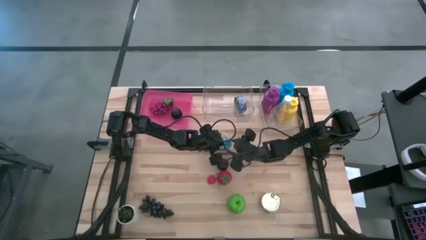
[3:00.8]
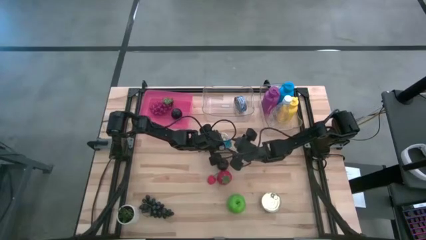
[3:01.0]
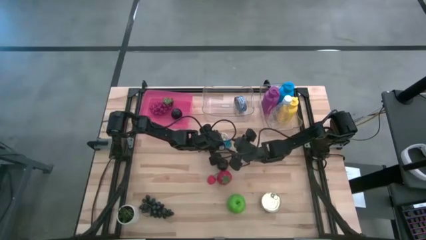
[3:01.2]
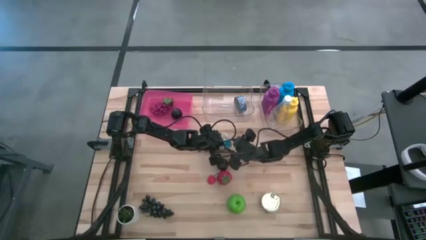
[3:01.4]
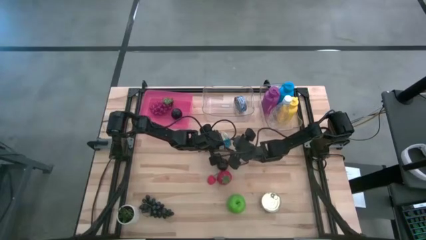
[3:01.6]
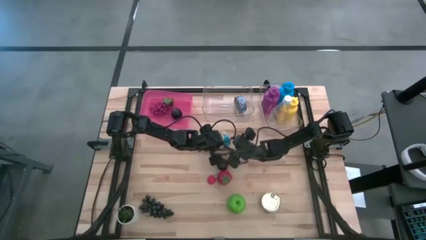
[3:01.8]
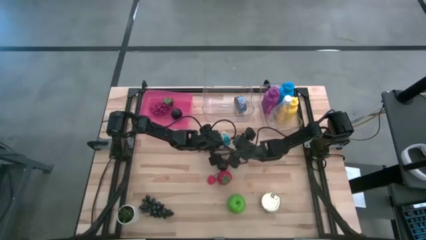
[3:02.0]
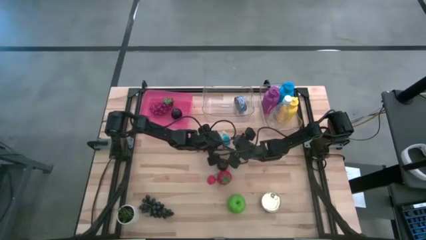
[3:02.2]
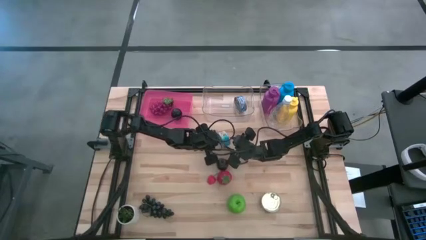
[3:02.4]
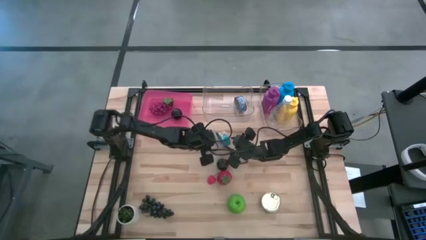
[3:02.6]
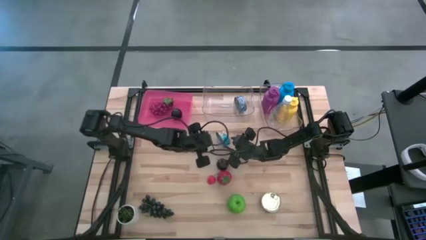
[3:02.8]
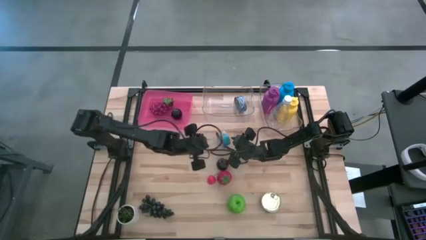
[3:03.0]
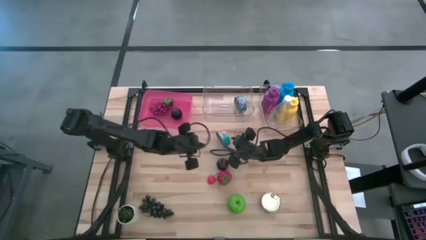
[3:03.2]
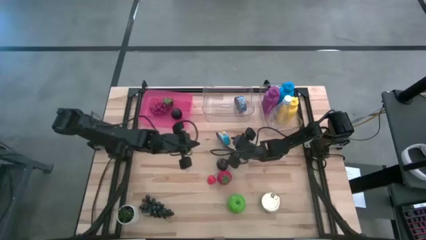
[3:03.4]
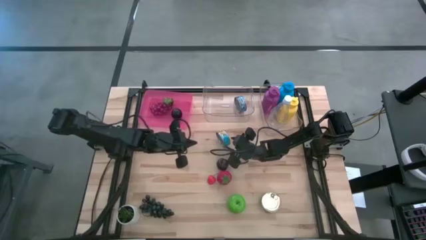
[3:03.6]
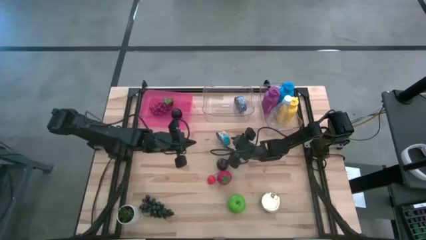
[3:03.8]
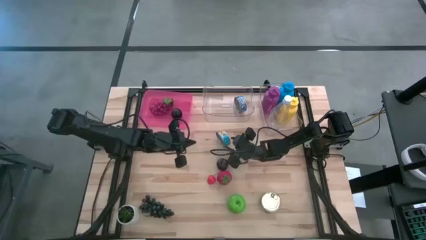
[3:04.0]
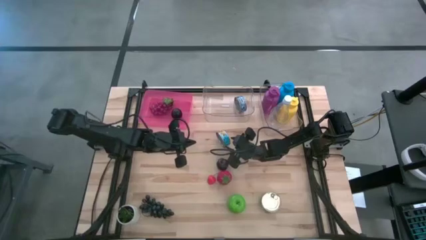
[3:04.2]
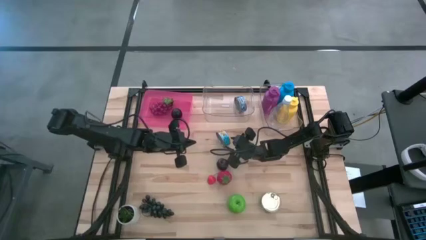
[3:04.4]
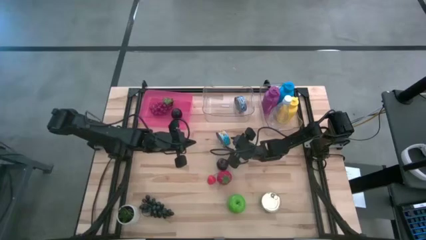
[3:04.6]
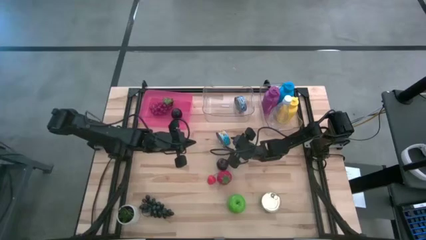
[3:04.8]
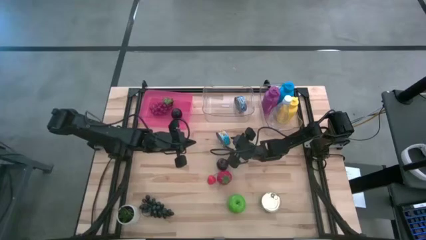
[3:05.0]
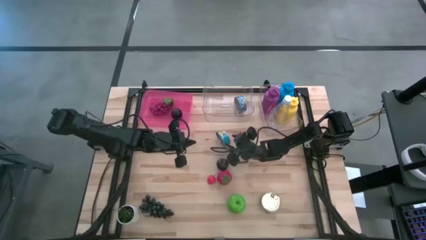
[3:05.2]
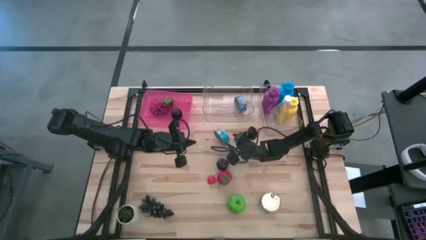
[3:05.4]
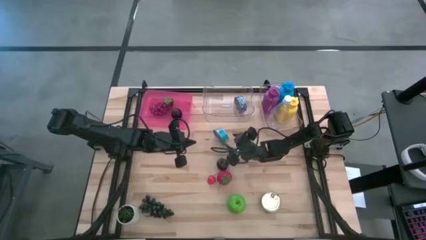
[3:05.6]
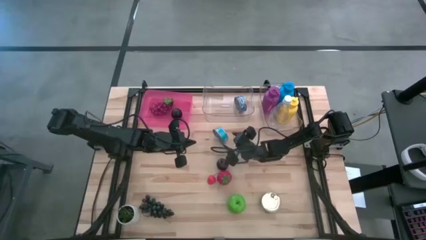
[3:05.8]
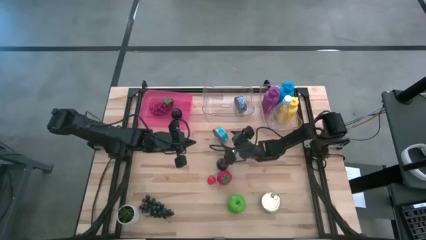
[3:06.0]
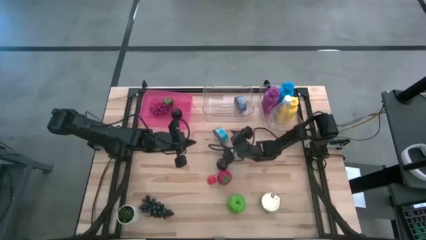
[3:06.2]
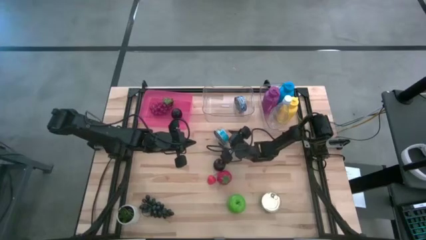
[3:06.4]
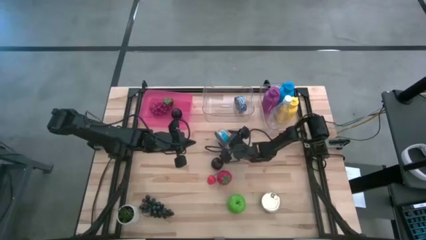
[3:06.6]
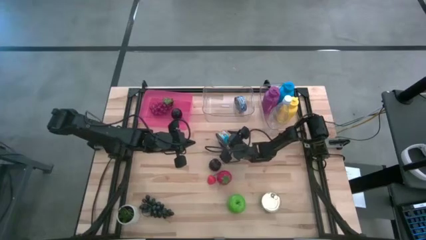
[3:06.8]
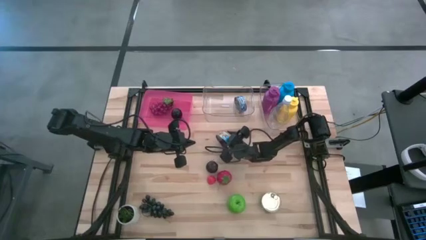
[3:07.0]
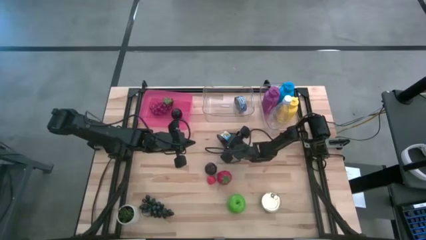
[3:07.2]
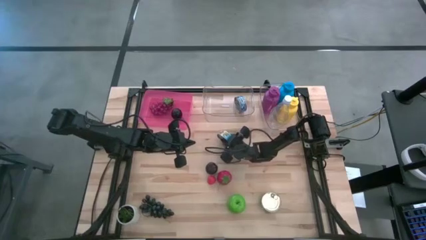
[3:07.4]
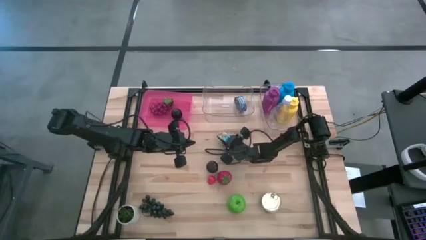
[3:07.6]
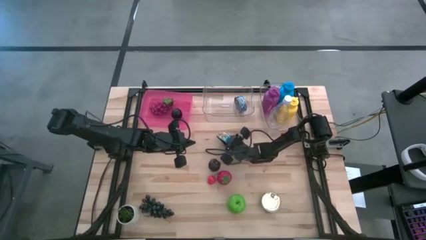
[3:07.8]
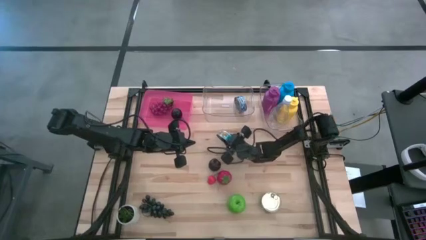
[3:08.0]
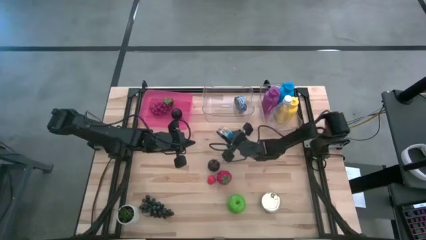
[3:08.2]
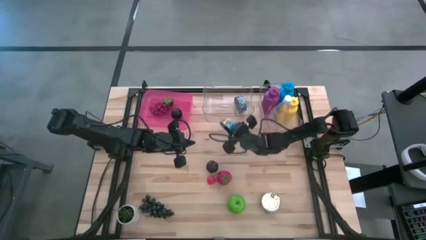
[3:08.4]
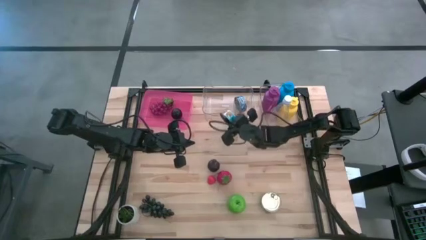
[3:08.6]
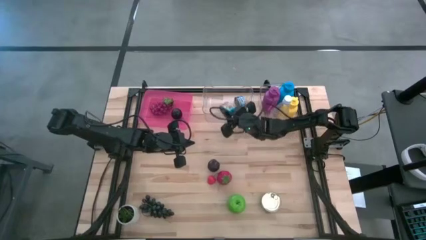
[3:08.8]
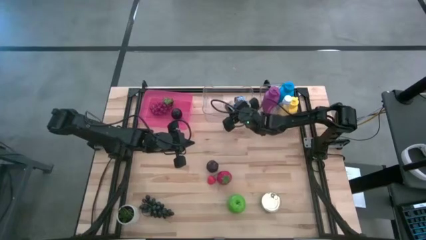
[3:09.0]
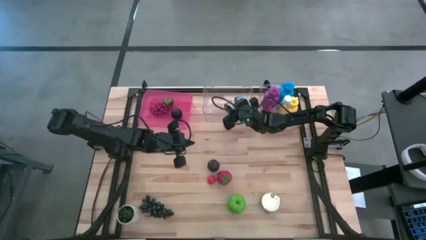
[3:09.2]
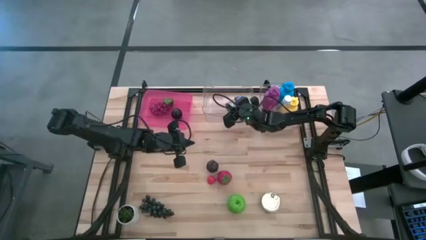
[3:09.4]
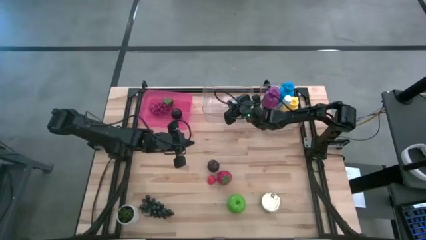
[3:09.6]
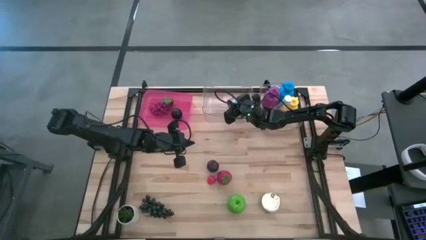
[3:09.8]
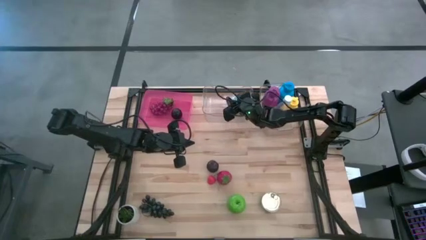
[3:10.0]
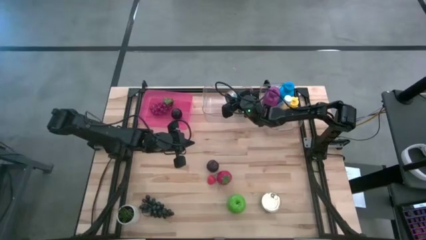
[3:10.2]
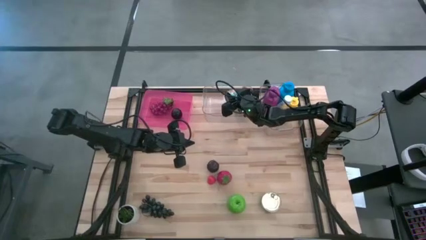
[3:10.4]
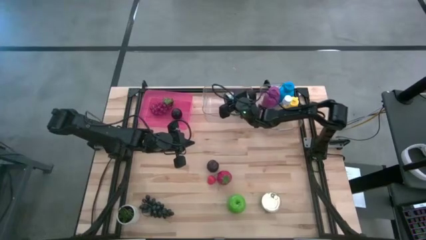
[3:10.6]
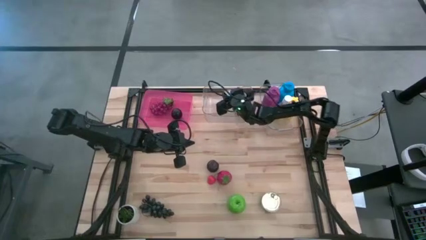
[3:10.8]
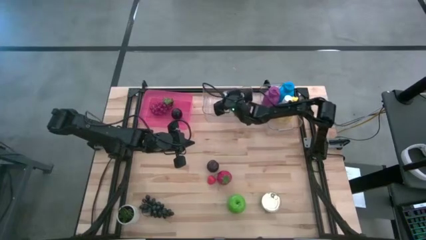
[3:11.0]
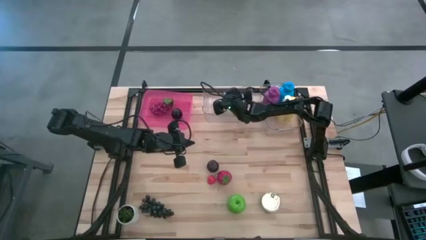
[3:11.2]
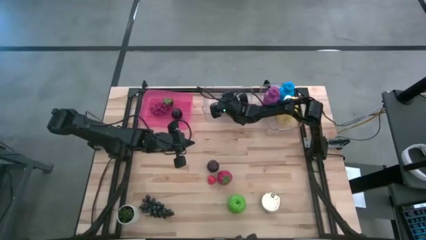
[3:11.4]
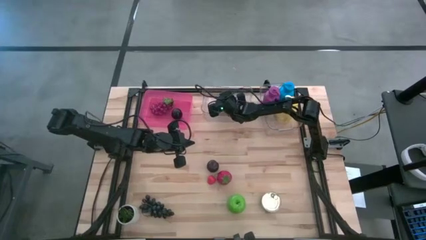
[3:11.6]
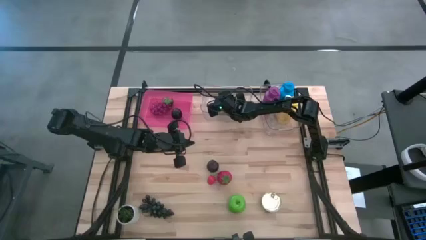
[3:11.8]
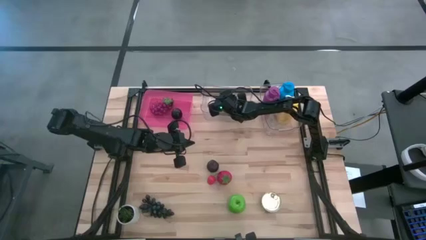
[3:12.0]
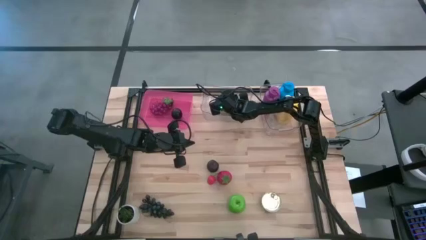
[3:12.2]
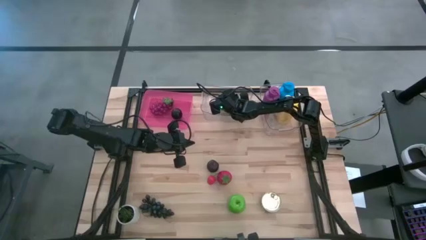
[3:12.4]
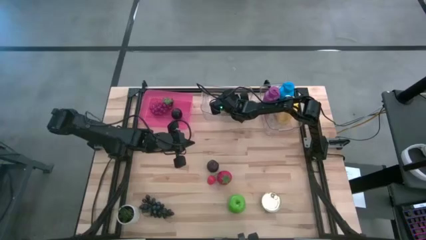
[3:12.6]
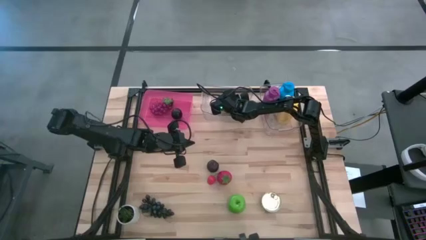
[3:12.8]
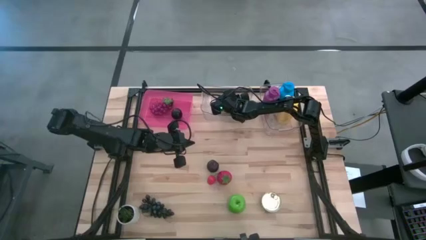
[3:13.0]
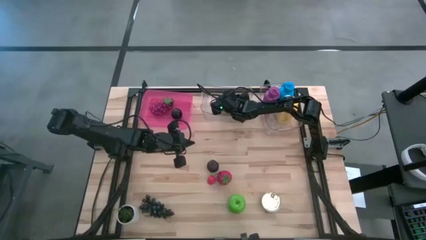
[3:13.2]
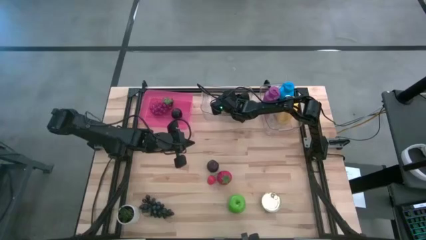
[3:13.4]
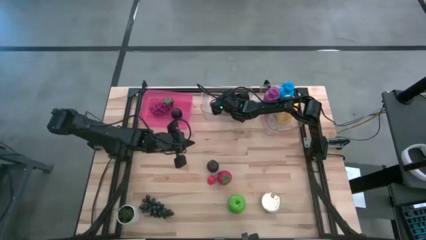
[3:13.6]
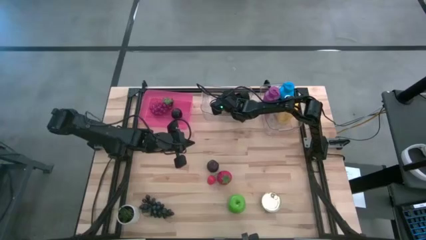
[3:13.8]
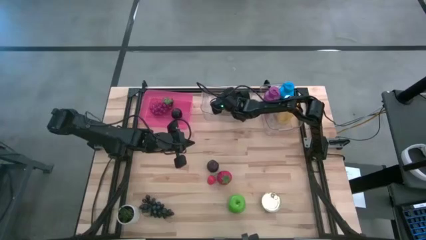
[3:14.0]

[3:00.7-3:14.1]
Task: Pick & Place Food Item
Put the light blue tuna can into the left transparent bin

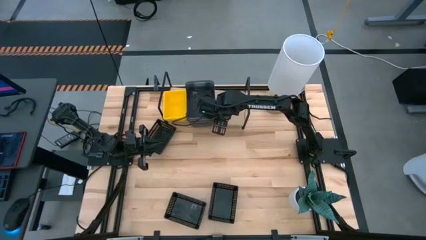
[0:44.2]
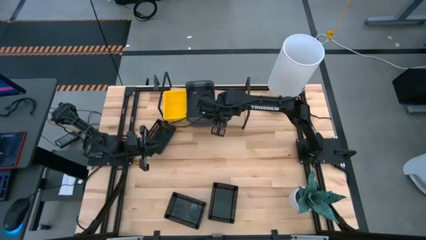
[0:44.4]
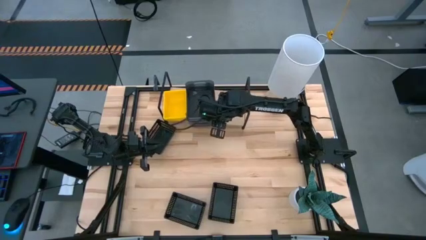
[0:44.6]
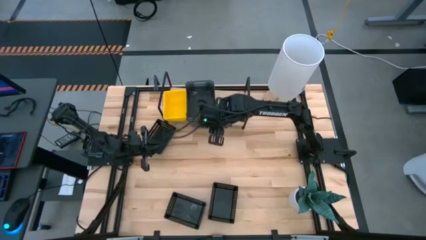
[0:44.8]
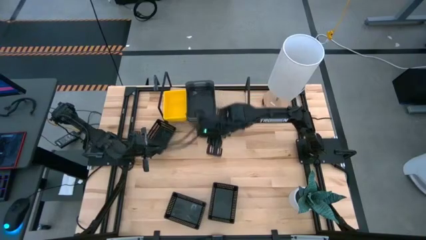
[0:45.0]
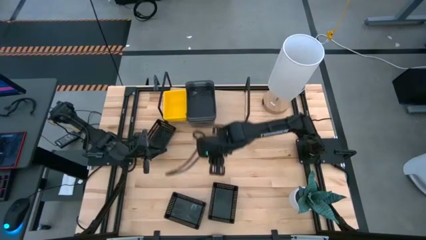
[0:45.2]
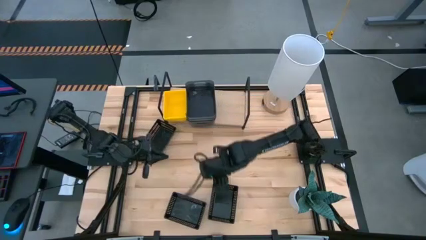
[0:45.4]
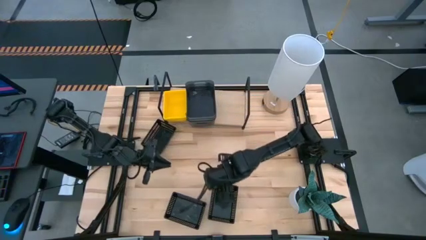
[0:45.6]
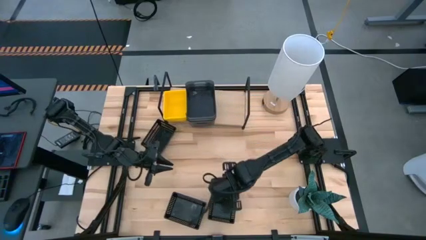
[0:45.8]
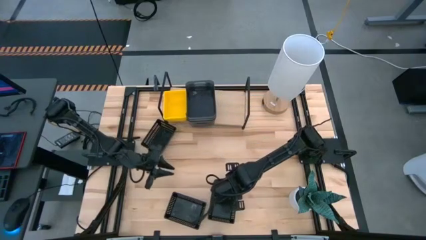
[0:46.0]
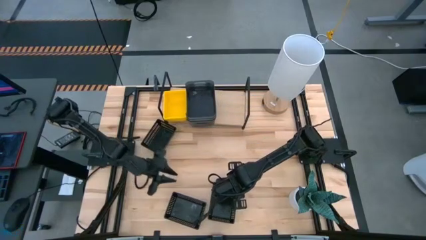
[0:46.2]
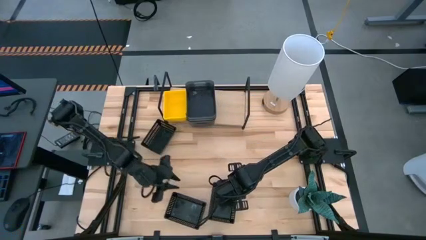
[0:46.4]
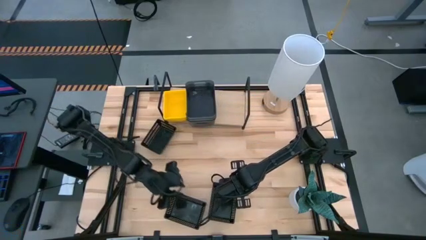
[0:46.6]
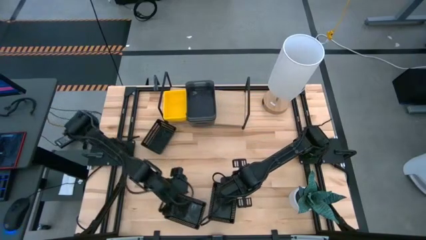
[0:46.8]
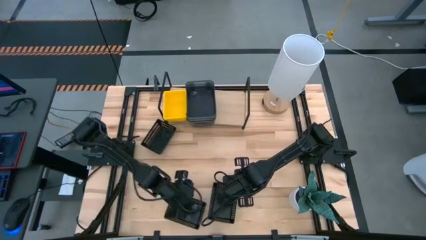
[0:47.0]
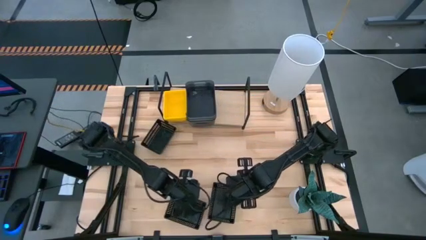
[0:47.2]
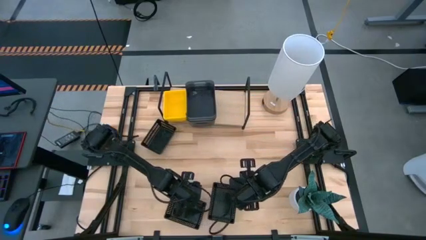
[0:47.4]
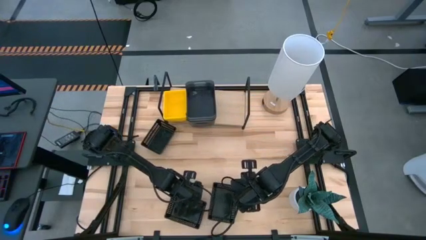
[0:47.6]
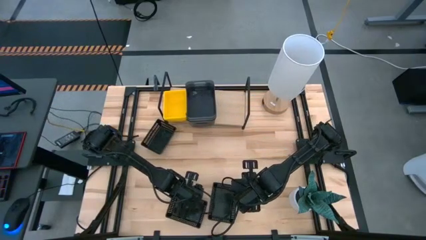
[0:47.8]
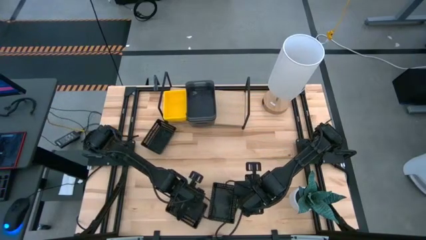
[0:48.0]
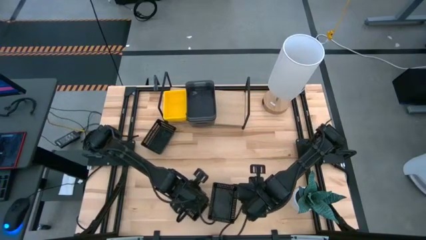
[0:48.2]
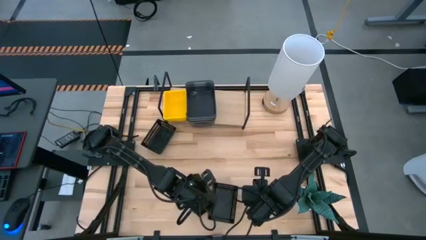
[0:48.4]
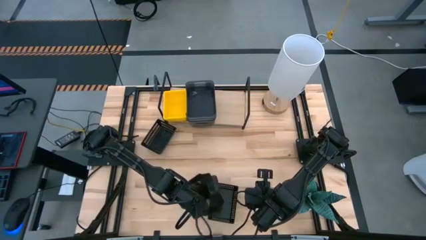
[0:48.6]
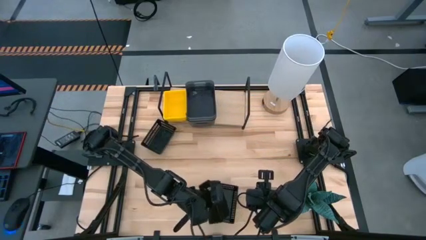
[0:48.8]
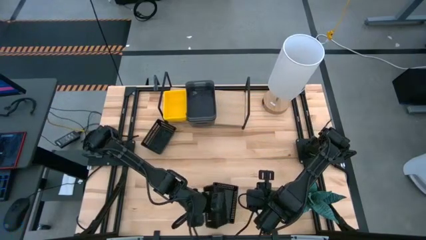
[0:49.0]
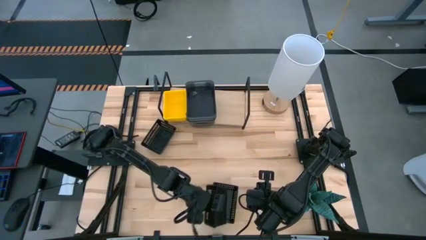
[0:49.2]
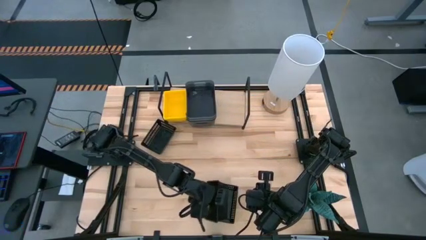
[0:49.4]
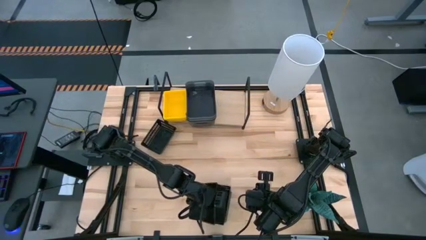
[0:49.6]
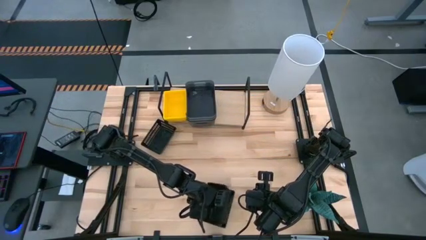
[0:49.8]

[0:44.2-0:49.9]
Task: Stack baskets on shelf by color
Stack the bottom left black bin on the bottom right black bin
